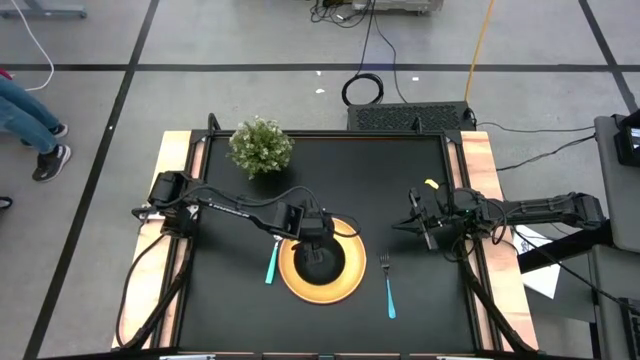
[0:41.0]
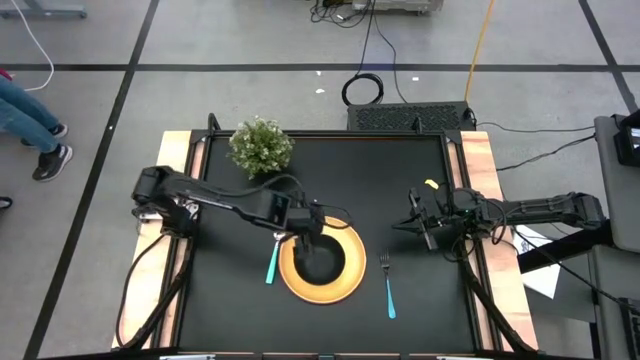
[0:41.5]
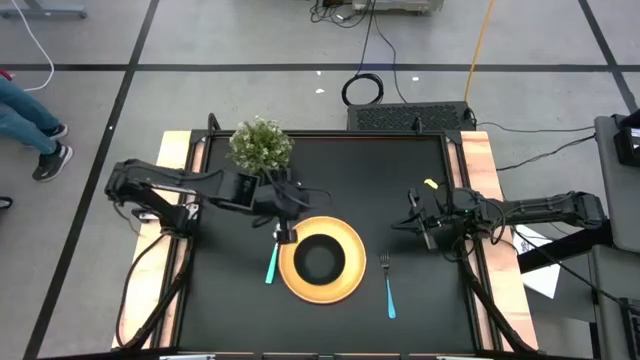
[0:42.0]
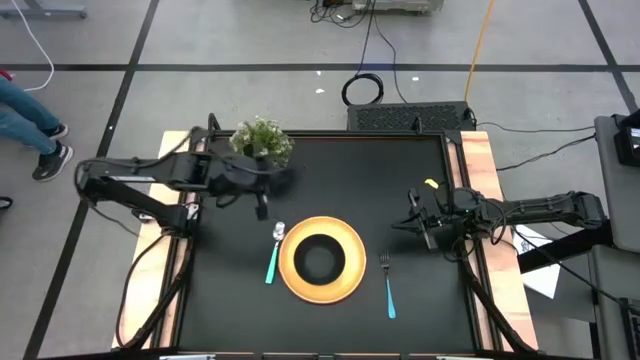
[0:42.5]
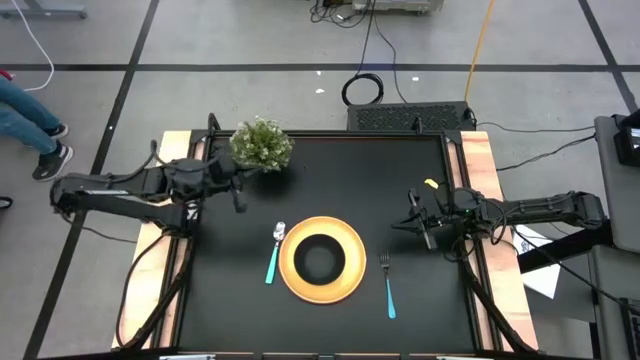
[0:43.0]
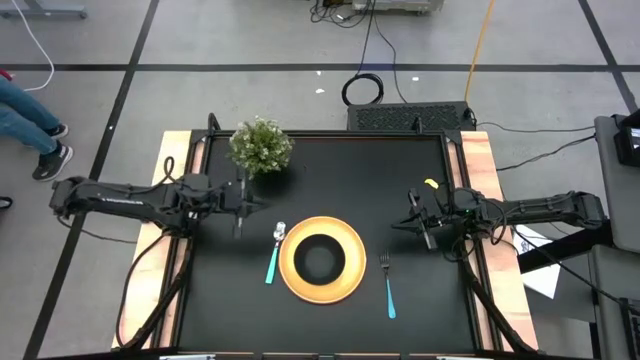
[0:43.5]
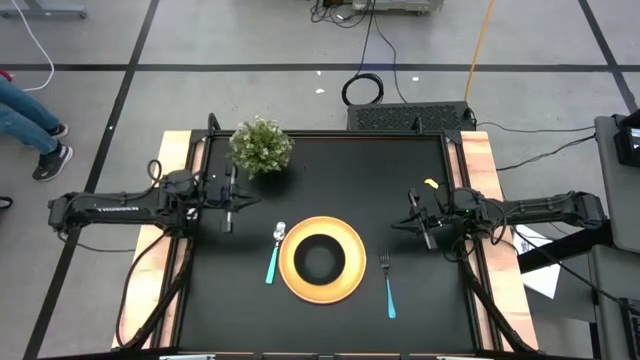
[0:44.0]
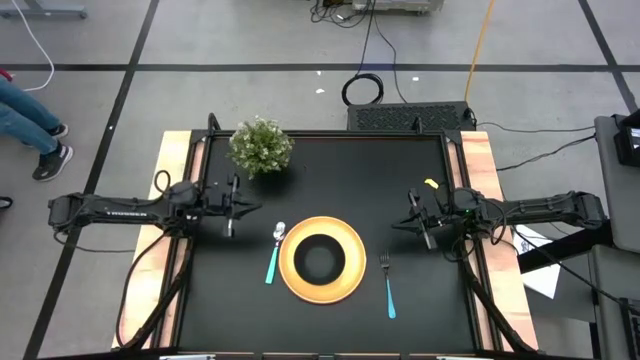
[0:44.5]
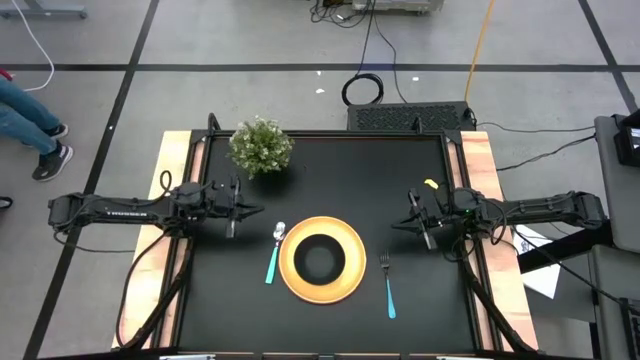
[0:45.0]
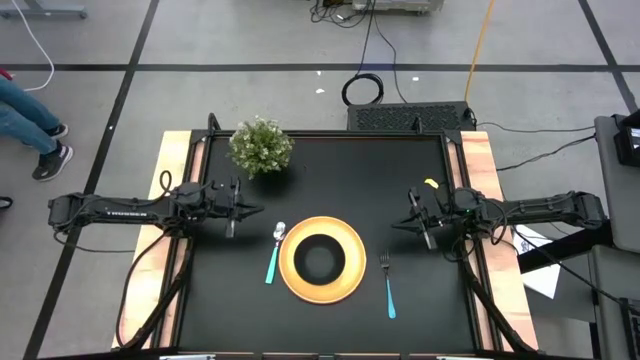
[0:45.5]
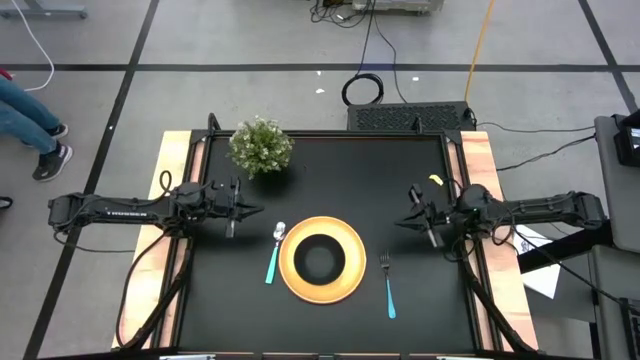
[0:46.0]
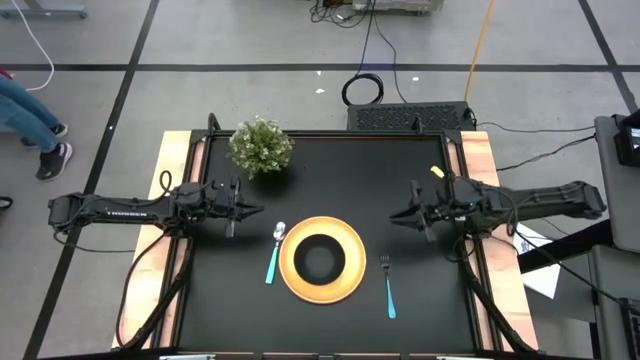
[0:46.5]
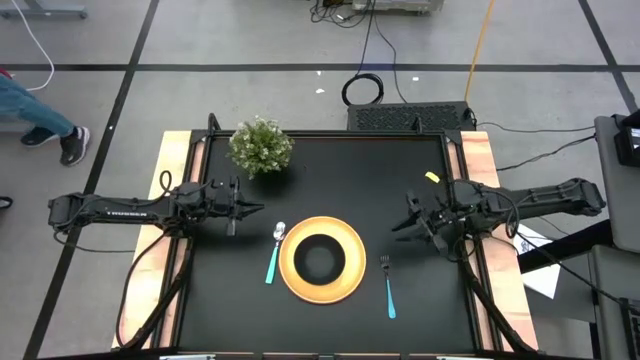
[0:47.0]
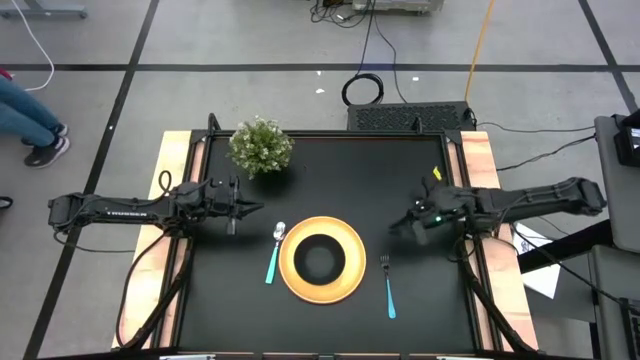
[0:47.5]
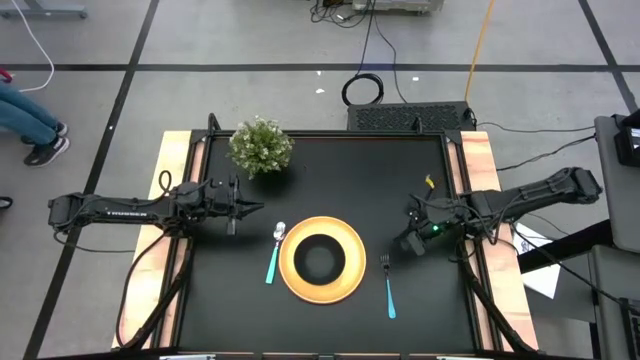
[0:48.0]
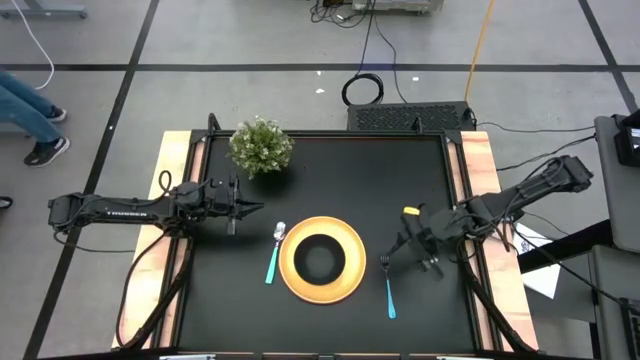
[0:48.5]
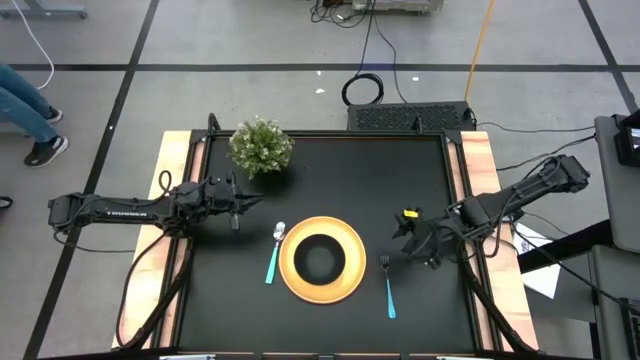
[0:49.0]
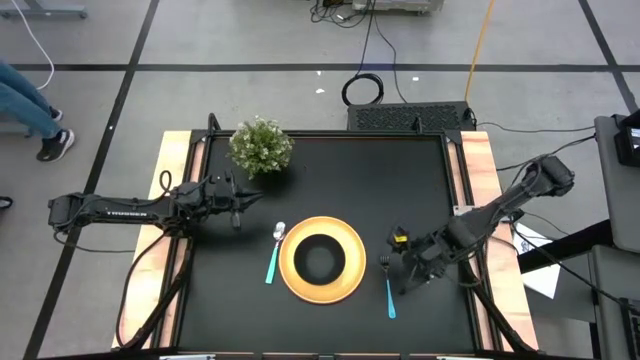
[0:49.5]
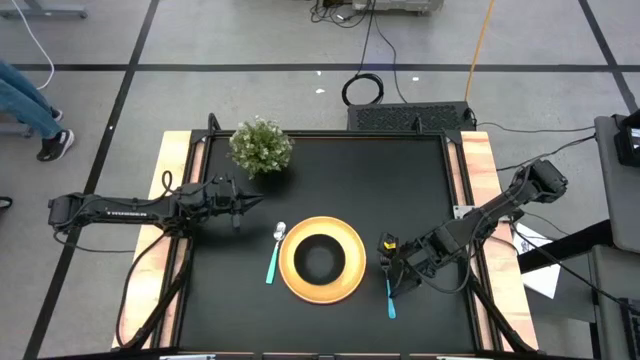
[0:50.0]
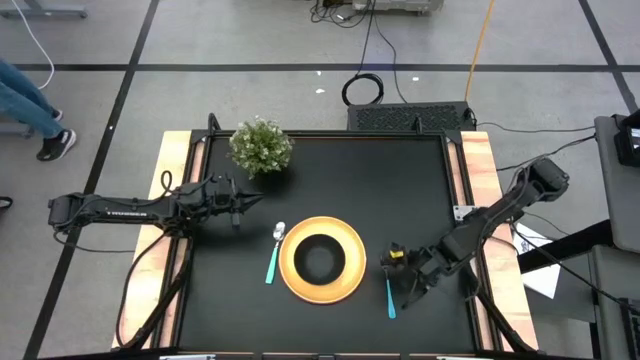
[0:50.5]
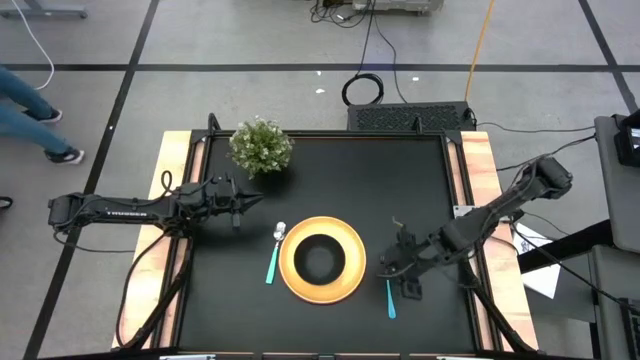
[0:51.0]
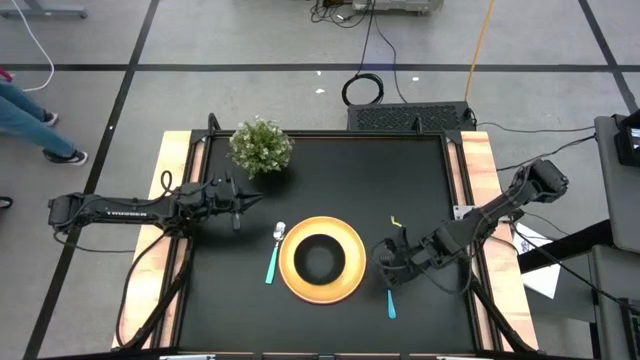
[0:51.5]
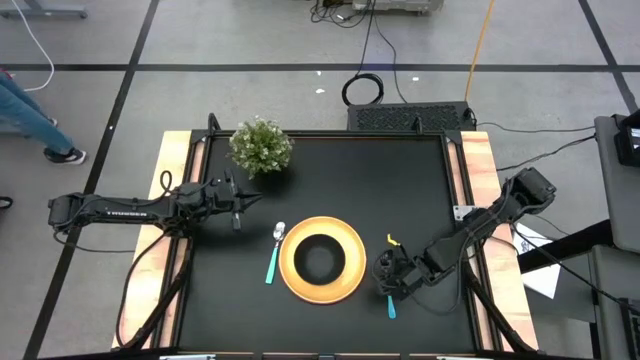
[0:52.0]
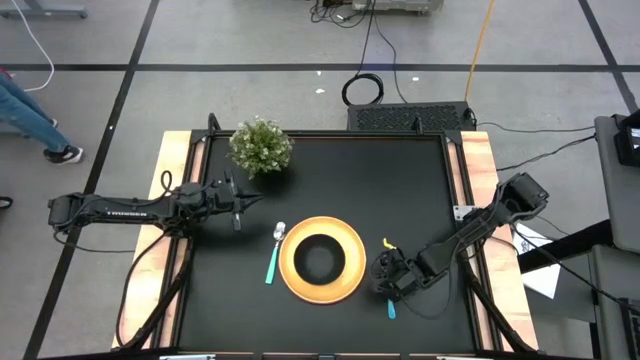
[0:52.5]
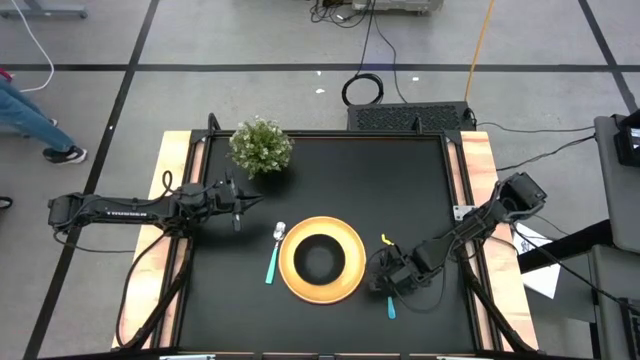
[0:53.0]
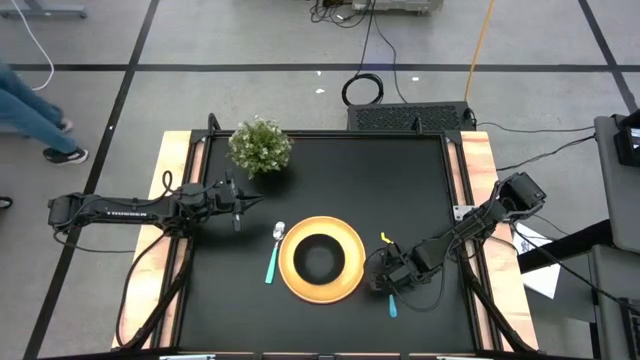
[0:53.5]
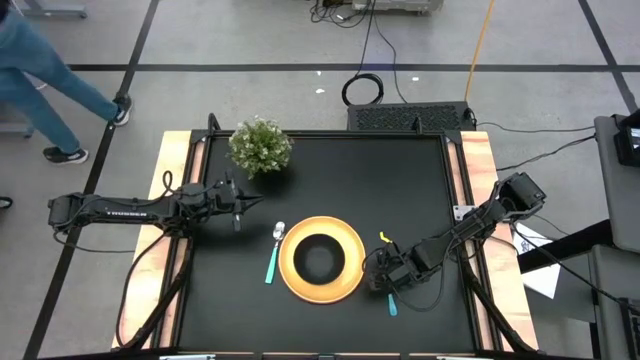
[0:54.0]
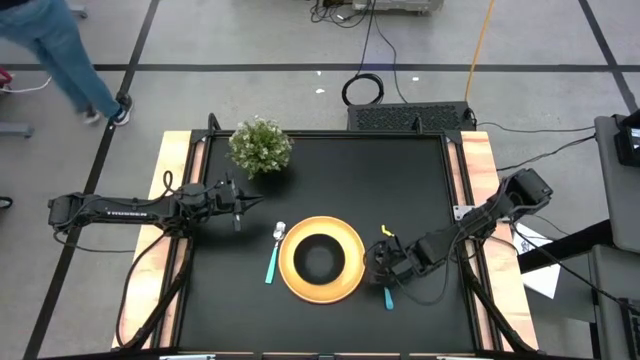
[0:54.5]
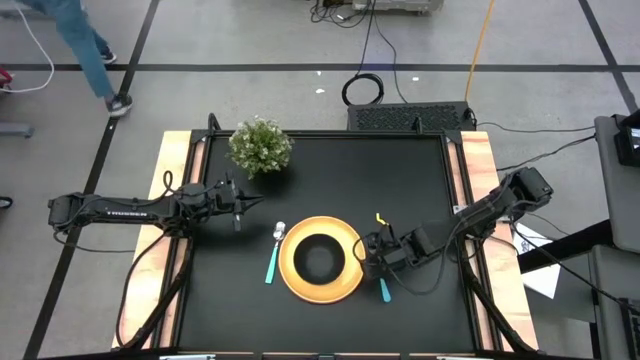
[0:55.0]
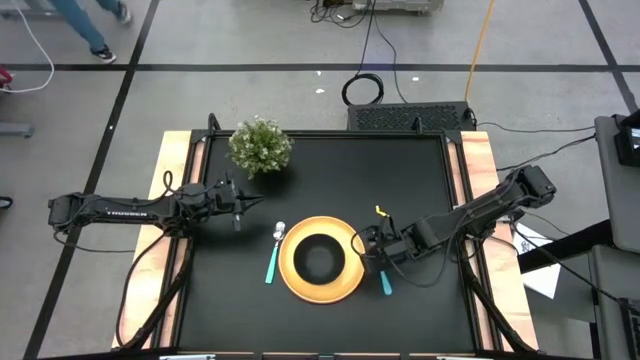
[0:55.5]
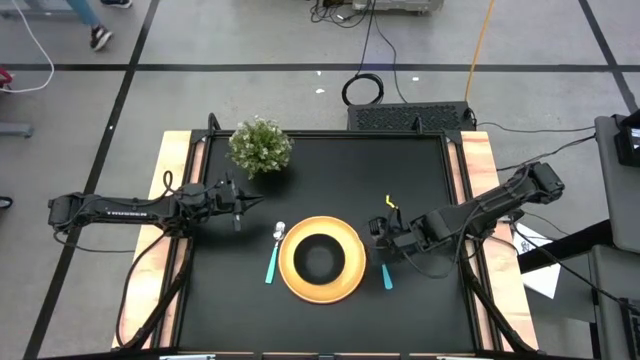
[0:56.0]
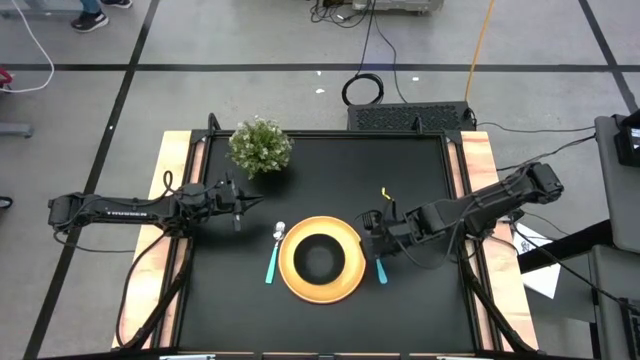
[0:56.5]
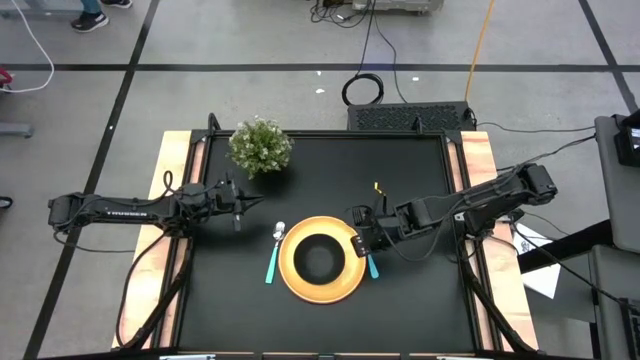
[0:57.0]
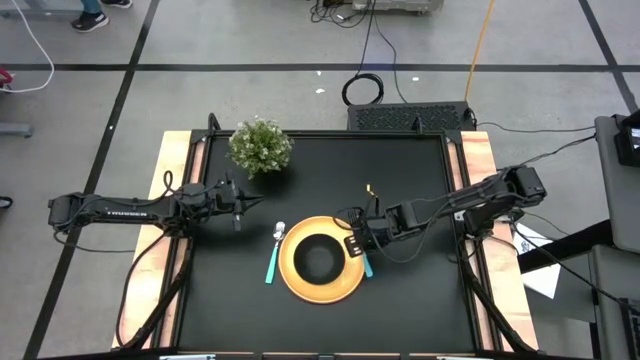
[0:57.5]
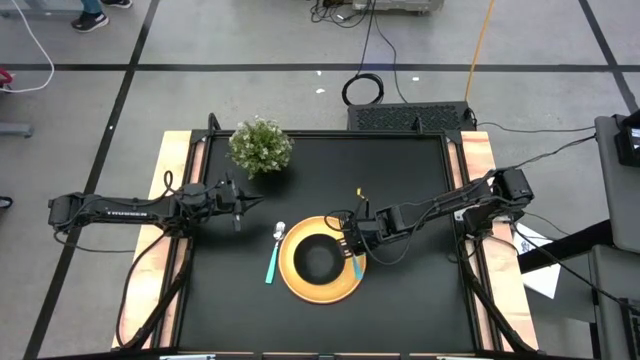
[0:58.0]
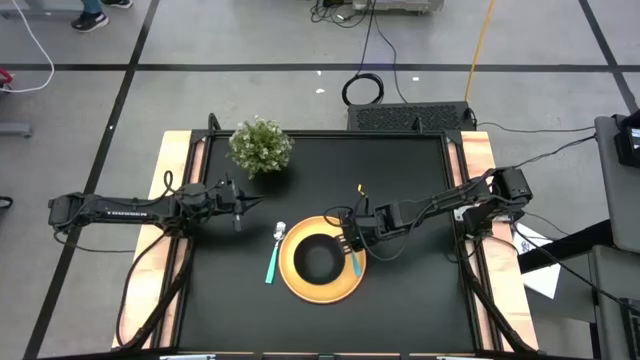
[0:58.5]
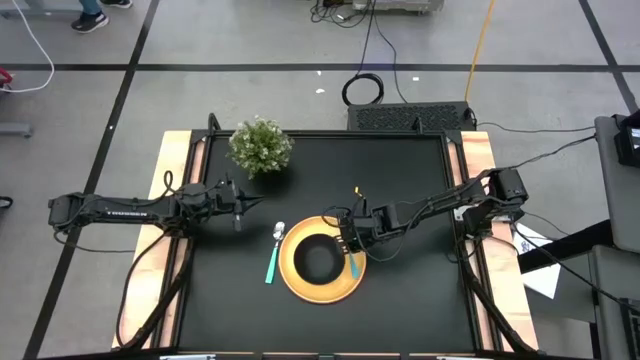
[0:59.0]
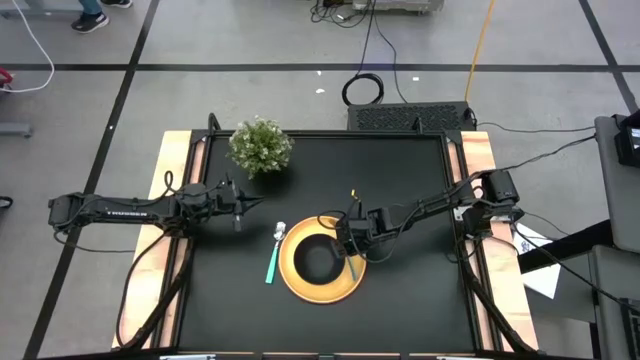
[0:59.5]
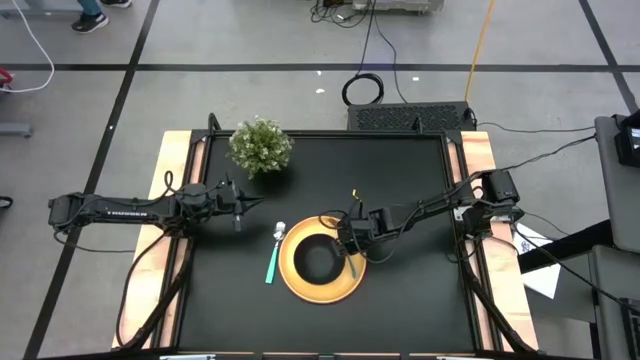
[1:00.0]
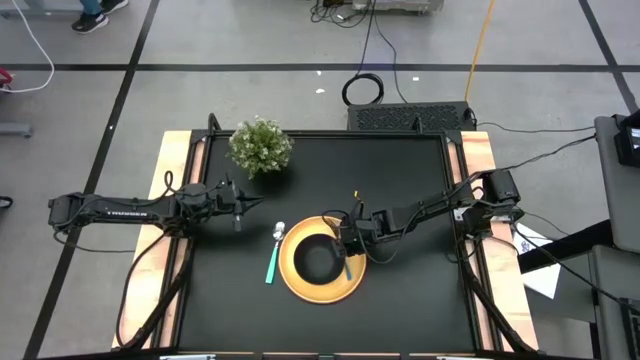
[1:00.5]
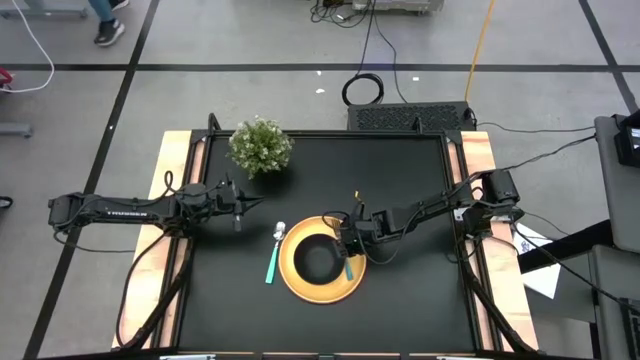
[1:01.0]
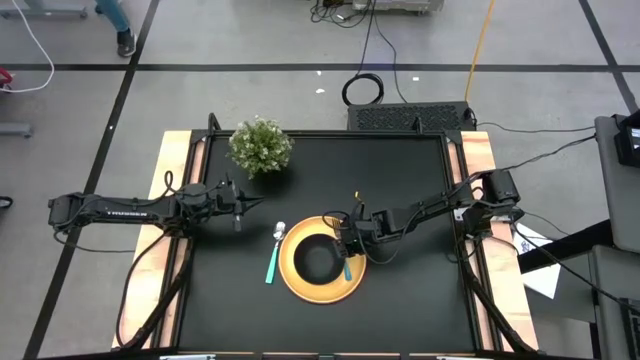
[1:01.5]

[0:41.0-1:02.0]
Task: Set table place
Put the blue fork on the yellow plate to the right of the black bowl
